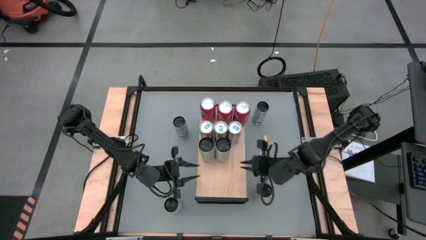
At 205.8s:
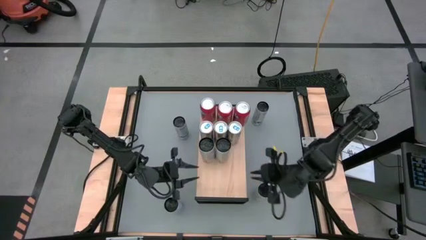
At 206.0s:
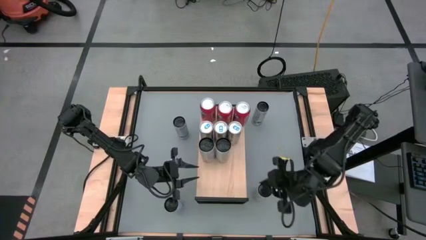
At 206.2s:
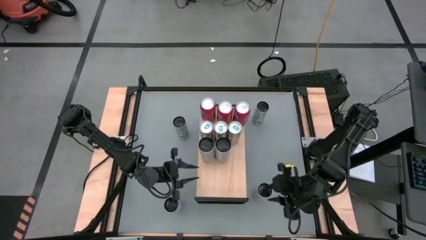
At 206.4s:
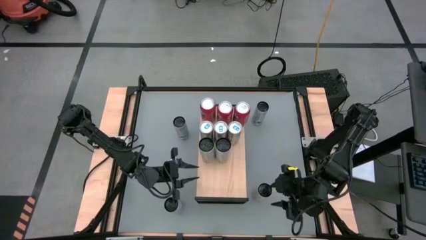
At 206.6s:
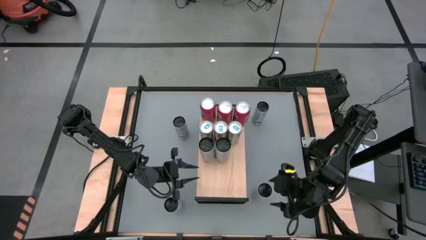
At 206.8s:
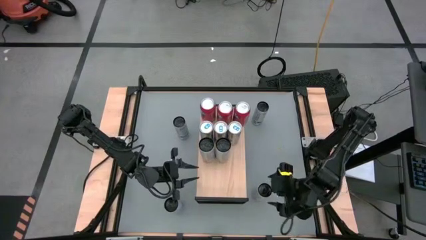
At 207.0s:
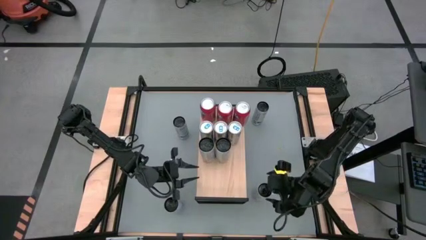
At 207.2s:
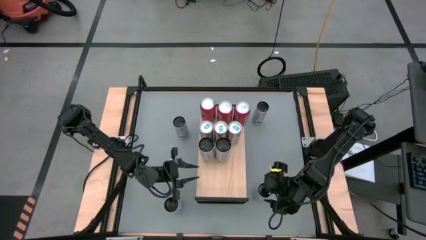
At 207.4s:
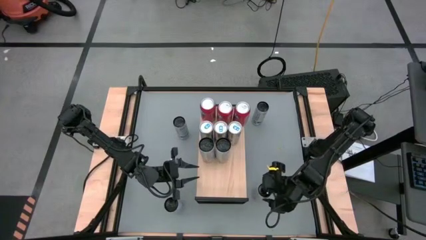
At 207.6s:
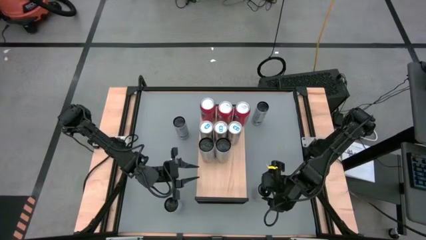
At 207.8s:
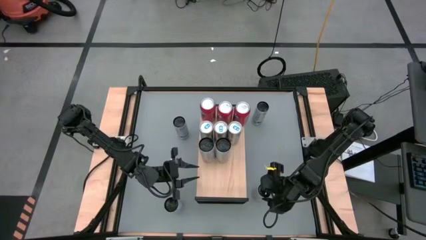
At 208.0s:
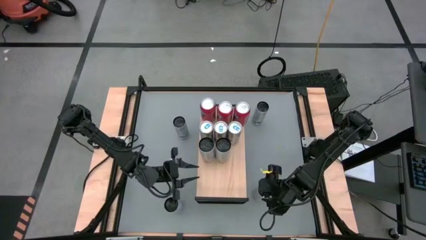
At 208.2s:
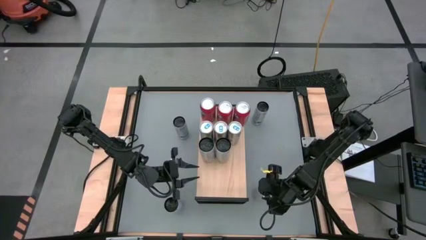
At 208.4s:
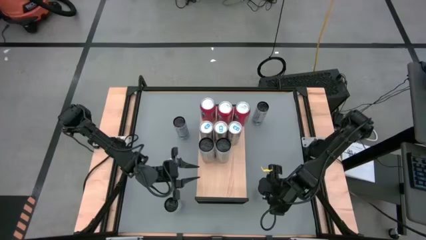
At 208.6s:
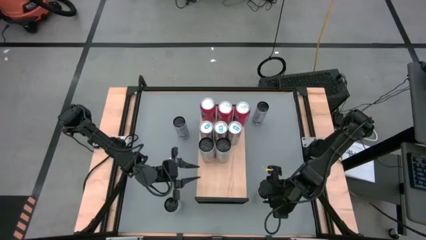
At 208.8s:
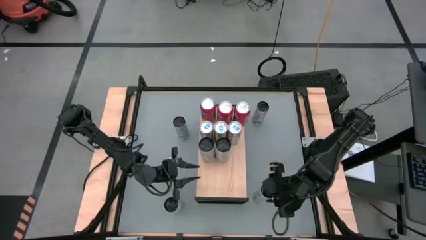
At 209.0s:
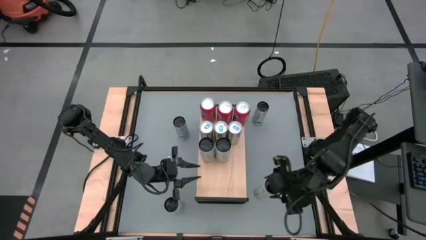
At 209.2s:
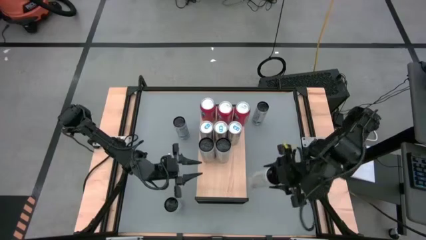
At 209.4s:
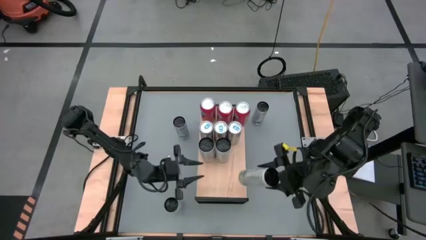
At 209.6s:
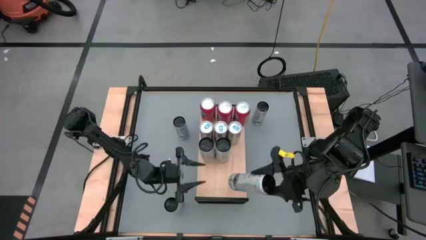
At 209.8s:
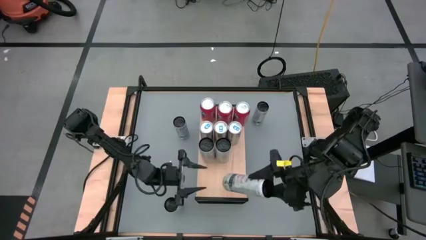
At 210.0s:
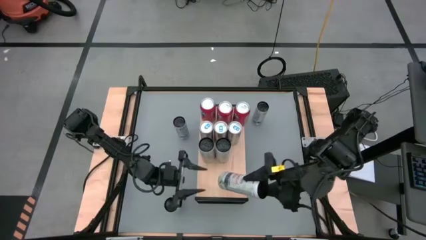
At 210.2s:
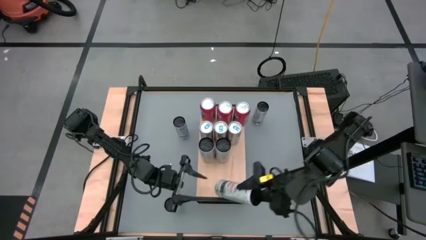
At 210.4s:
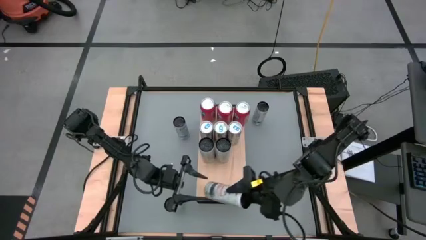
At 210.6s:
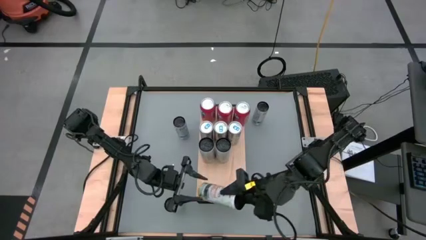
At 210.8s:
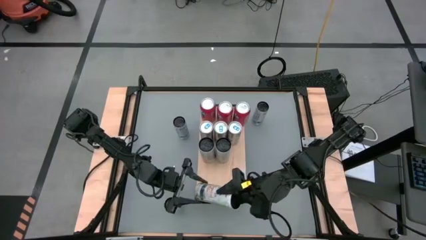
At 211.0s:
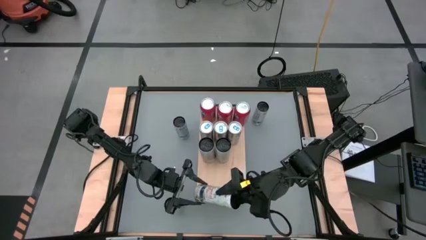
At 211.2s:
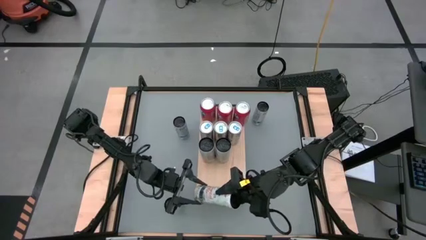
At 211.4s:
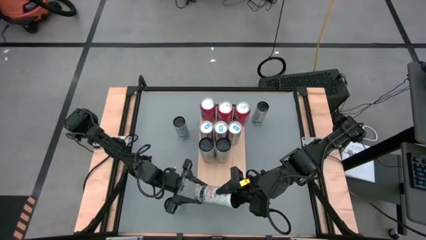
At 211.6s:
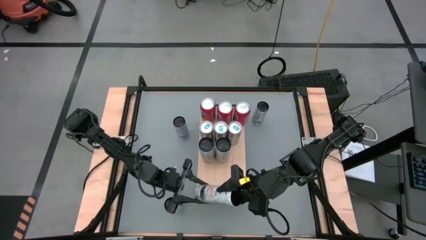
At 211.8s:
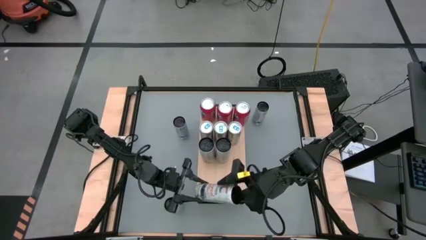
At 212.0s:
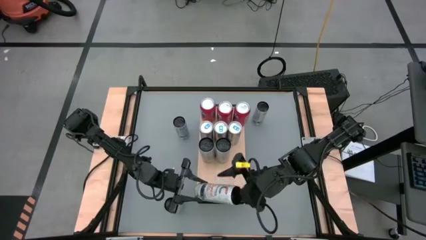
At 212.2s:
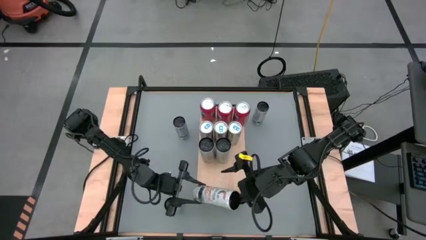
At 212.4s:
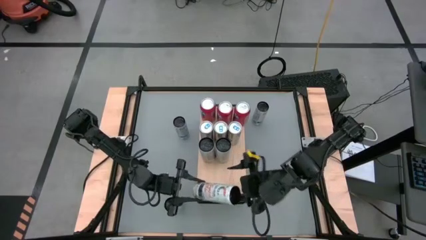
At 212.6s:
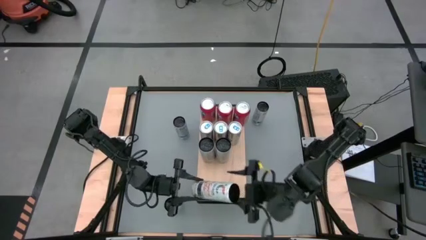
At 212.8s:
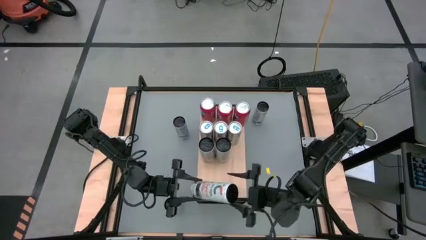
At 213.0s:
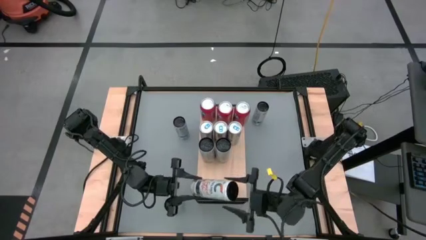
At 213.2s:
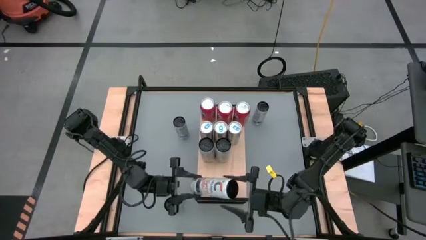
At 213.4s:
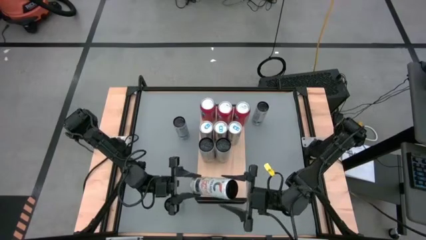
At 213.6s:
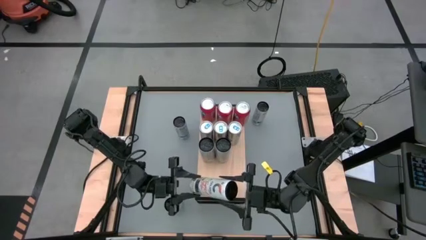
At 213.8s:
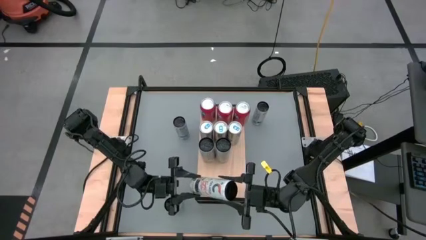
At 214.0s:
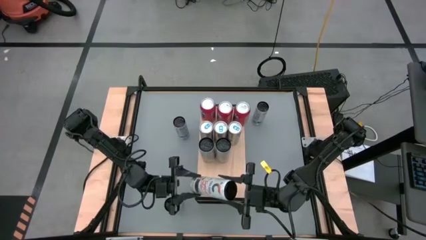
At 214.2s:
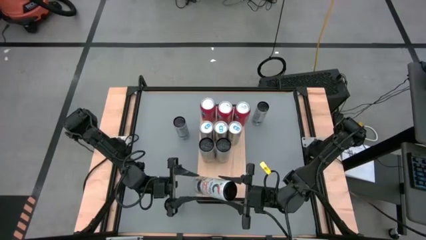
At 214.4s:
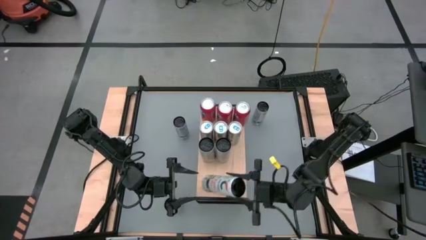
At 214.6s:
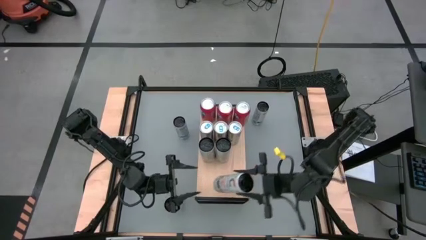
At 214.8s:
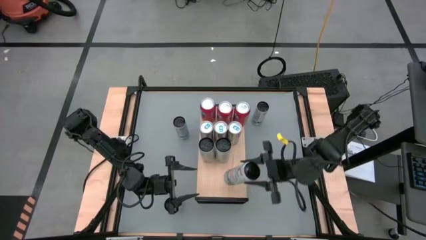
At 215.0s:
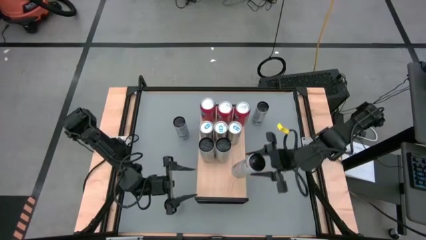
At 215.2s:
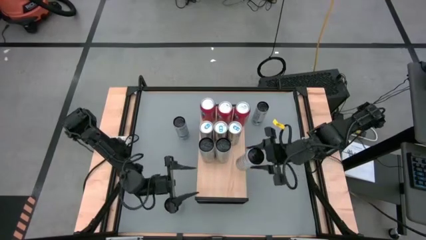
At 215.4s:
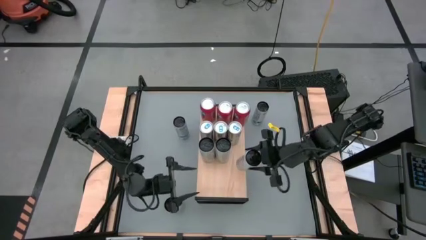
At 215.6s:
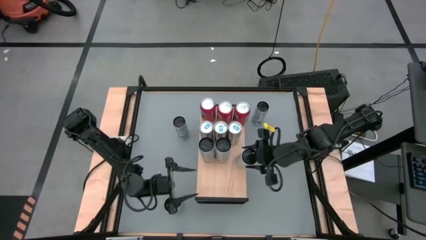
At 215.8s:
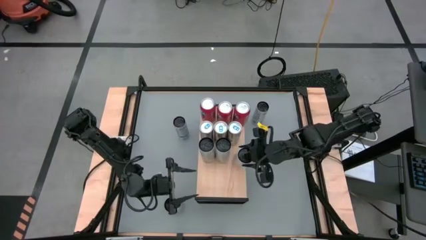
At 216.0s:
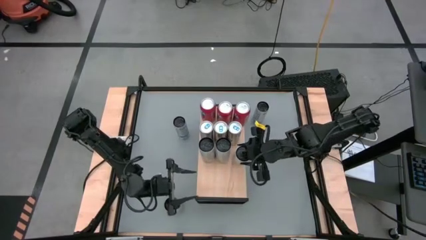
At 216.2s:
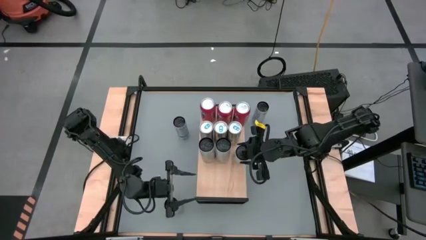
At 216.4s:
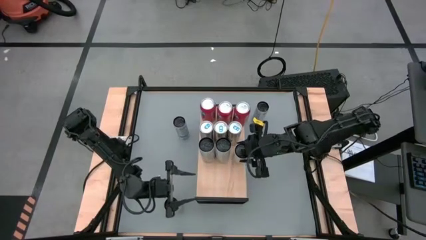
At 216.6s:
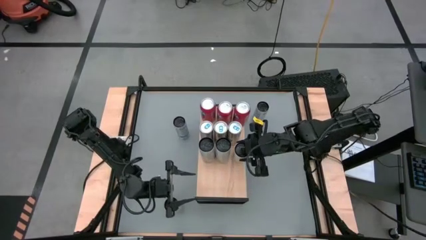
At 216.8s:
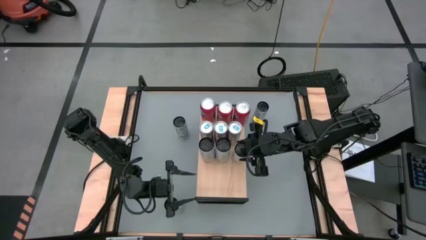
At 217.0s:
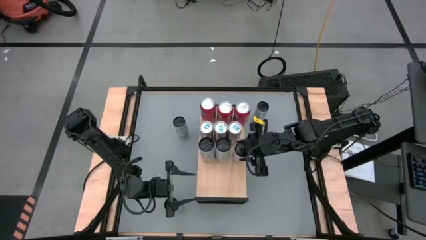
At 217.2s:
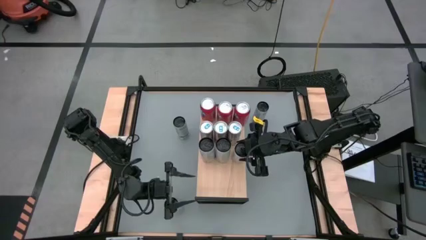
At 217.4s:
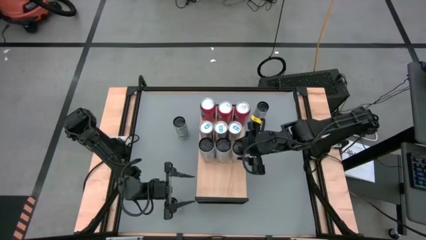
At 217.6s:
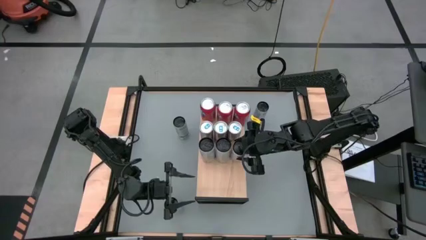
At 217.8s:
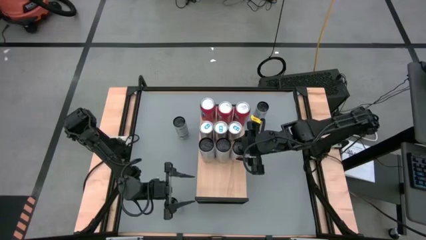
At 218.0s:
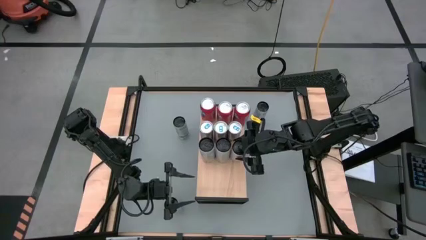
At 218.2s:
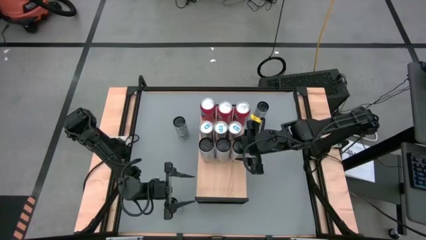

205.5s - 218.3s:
Task: Place canned beverage on shelf
Put the bottom right white soda can on the shelf aligned with the other blue soda can

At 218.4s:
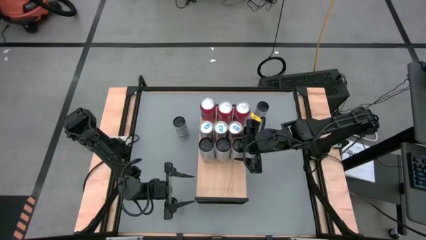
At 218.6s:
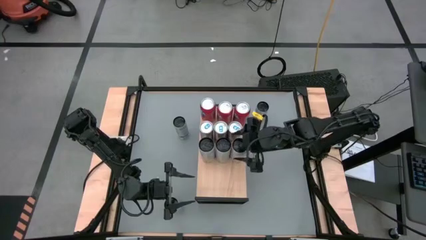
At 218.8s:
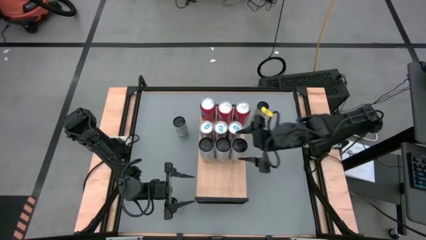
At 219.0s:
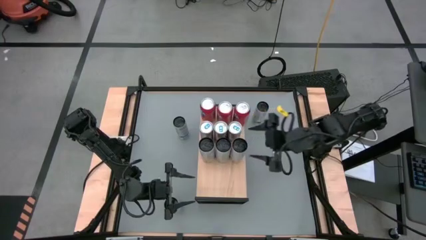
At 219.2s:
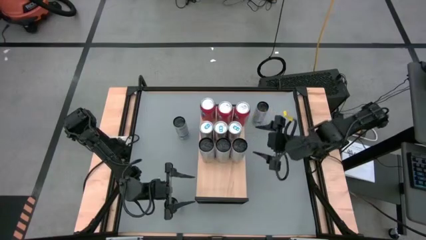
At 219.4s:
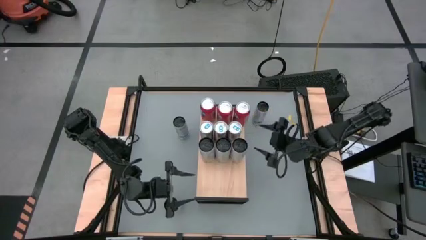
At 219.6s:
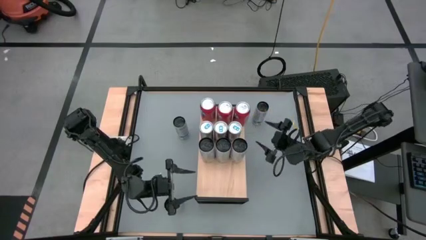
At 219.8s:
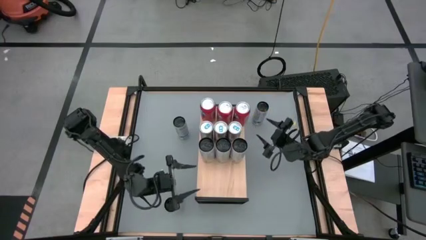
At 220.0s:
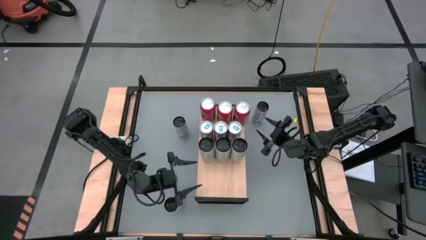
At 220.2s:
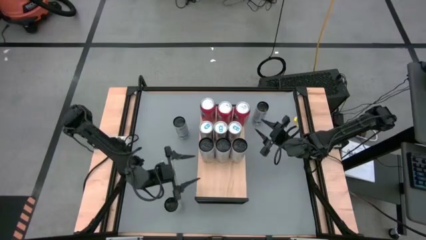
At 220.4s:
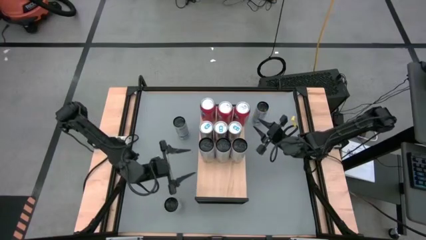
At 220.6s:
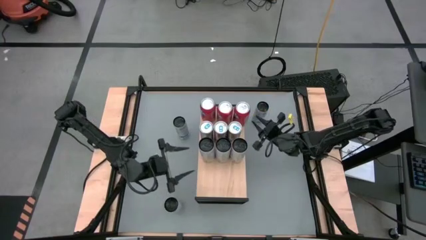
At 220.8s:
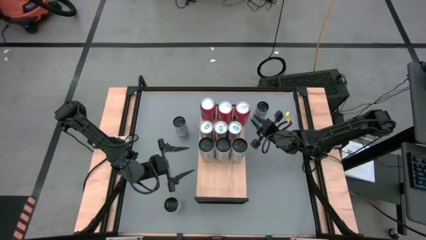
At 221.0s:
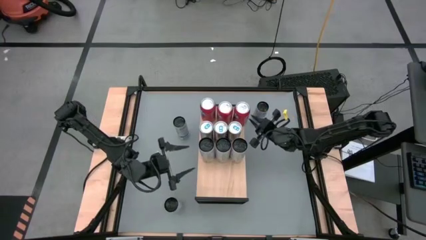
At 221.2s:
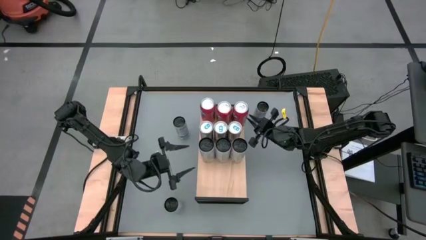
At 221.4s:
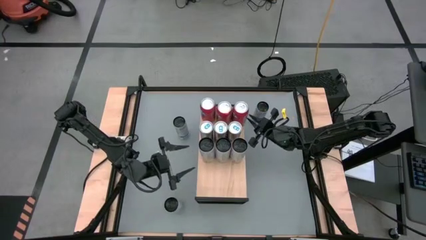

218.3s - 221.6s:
Adjust the orange can on the shelf
